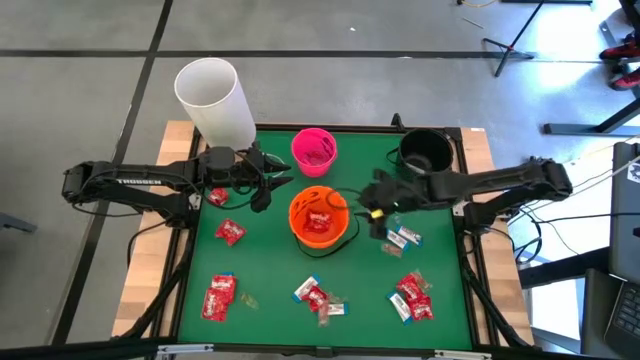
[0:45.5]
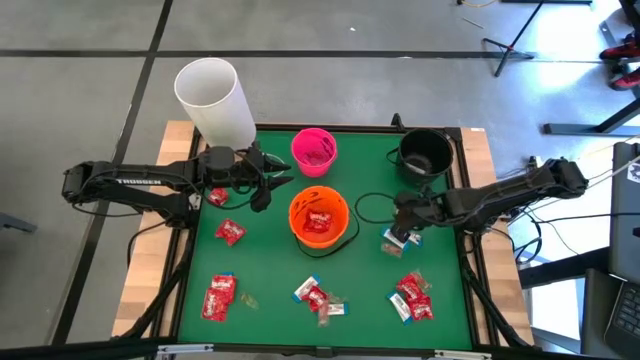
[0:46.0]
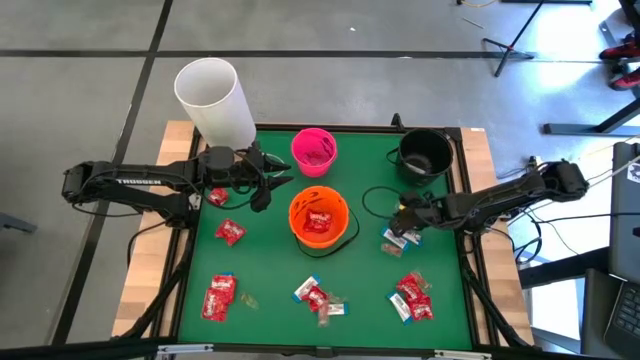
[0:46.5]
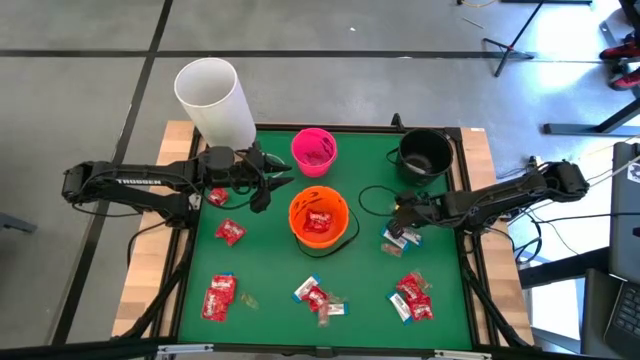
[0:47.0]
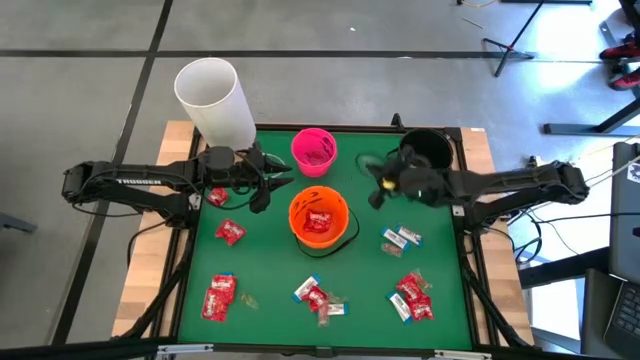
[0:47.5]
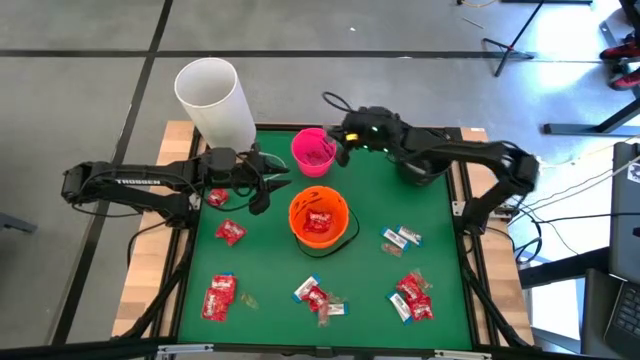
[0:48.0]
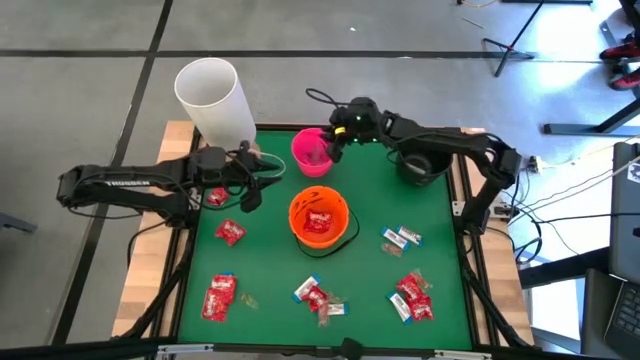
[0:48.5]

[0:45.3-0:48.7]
Task: Sort candy
Put the blue candy into the pink bucket

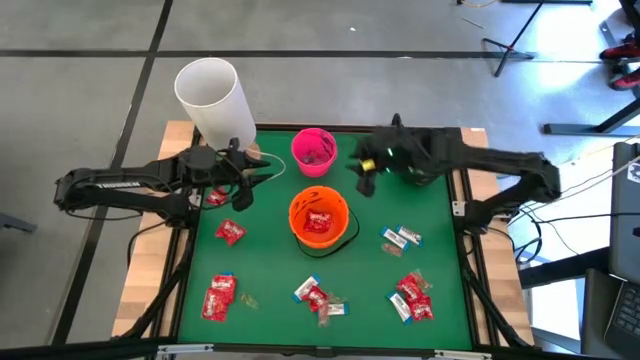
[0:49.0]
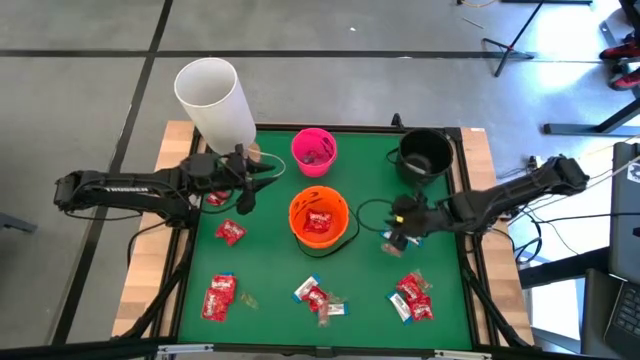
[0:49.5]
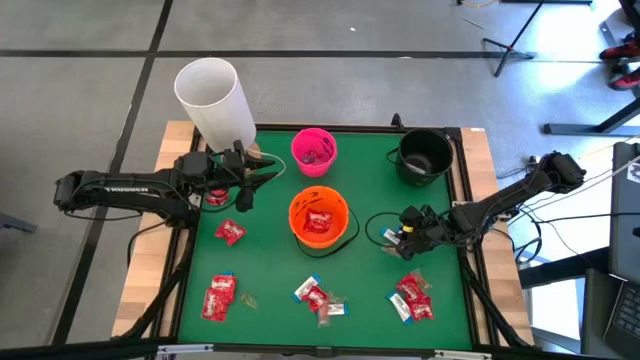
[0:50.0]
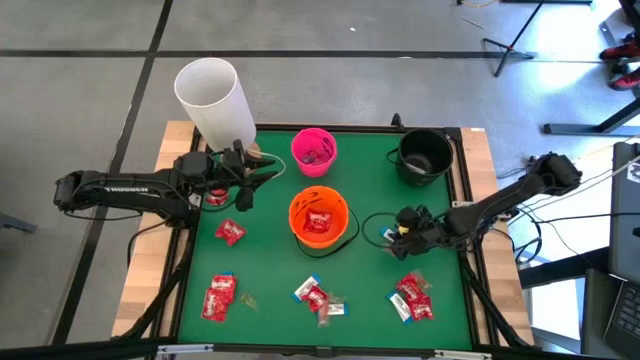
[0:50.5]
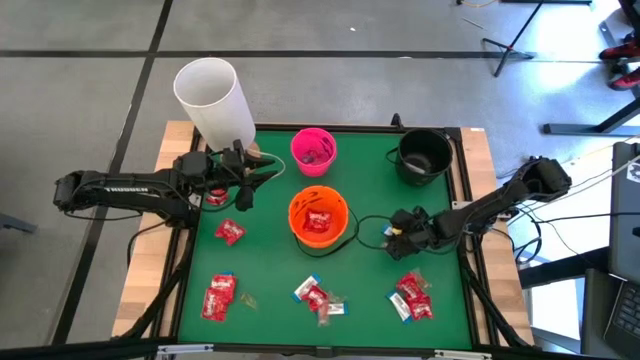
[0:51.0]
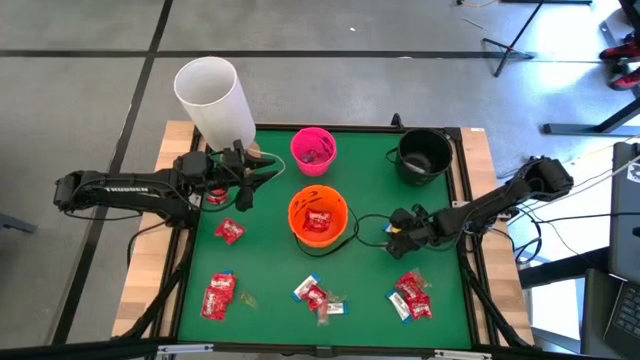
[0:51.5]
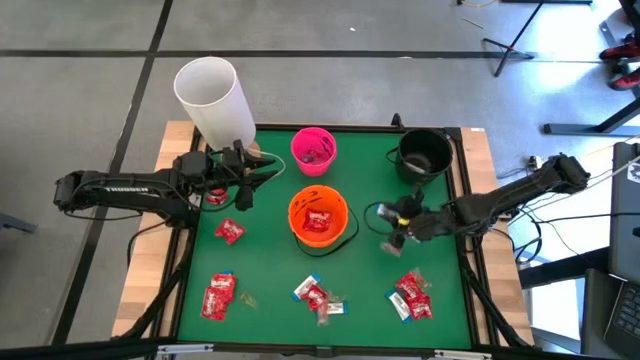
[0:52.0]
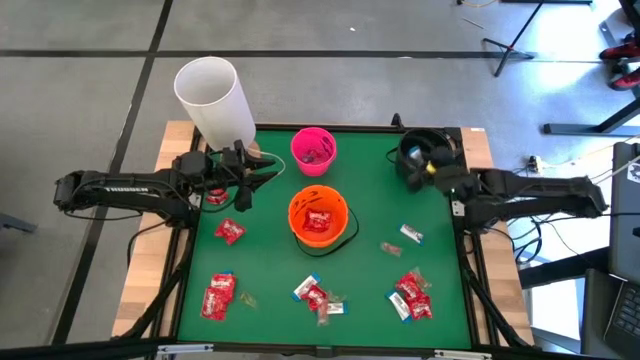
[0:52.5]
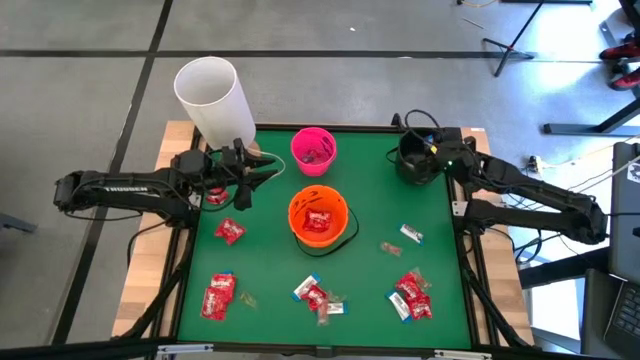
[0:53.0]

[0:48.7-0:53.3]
Put the white candy into the black bucket

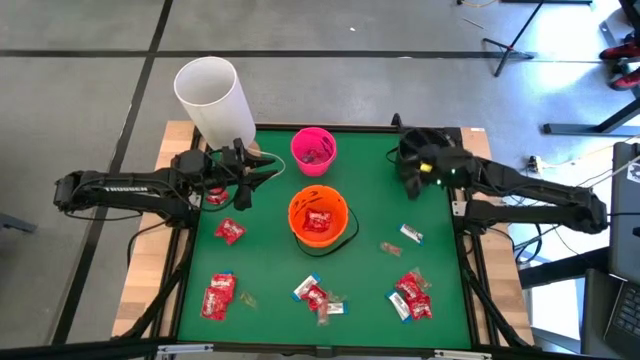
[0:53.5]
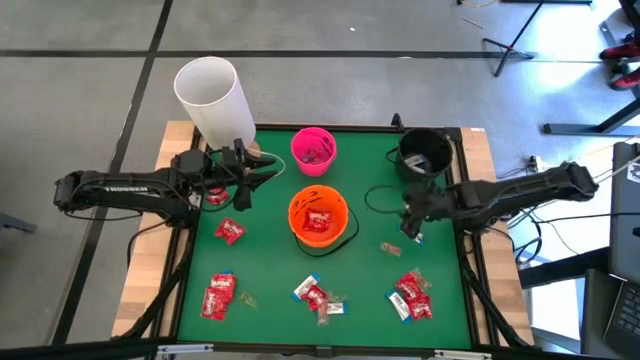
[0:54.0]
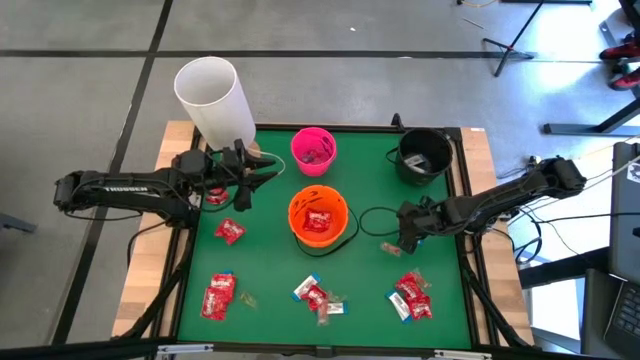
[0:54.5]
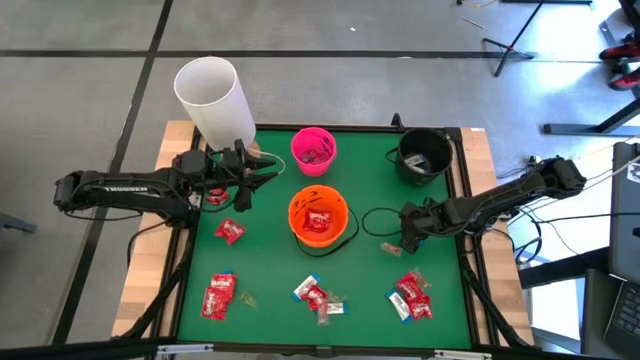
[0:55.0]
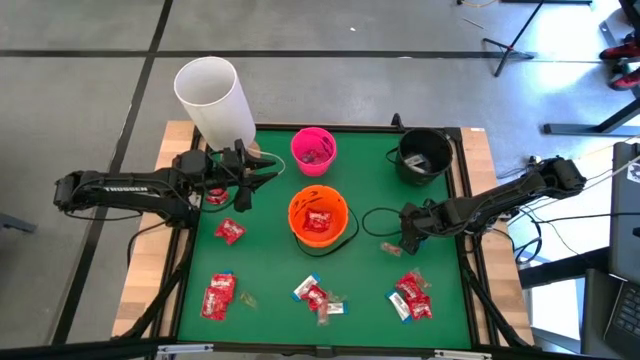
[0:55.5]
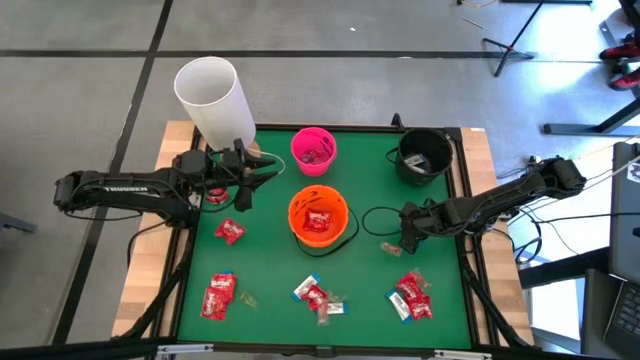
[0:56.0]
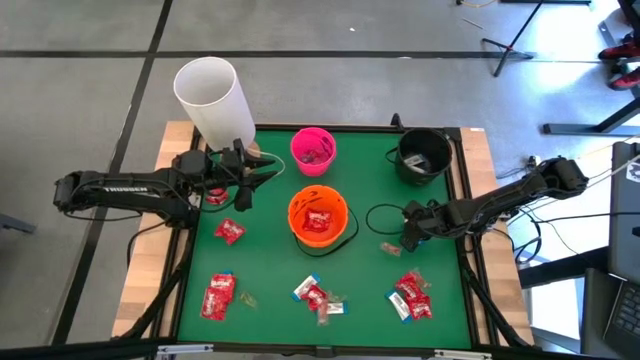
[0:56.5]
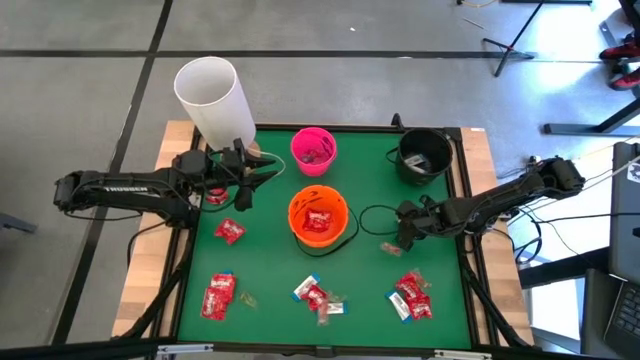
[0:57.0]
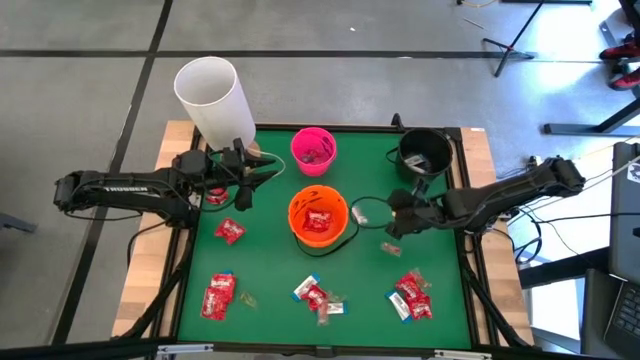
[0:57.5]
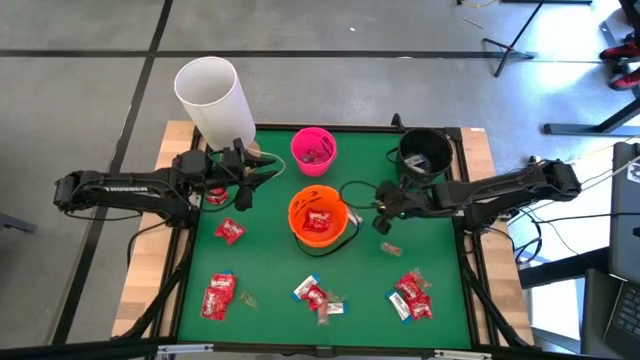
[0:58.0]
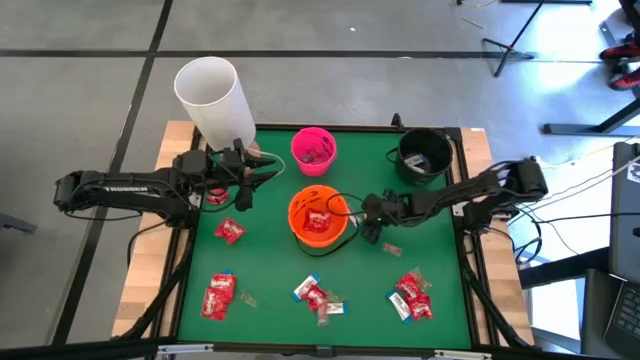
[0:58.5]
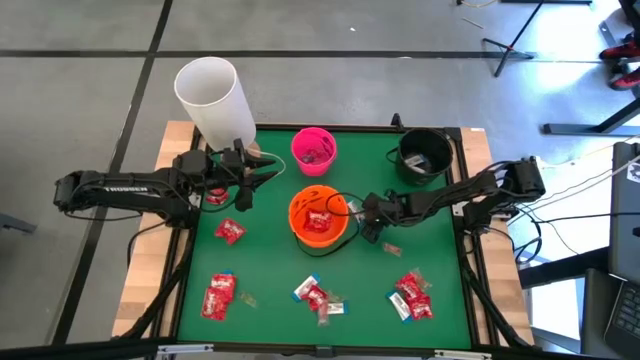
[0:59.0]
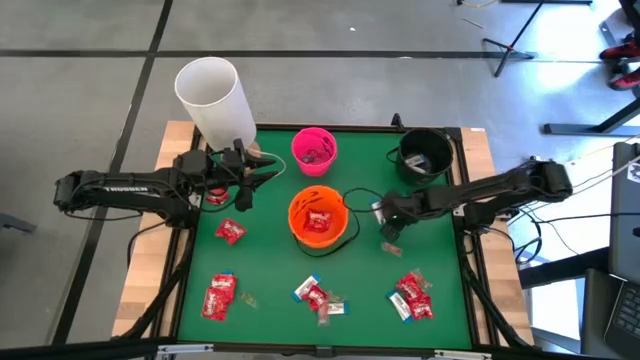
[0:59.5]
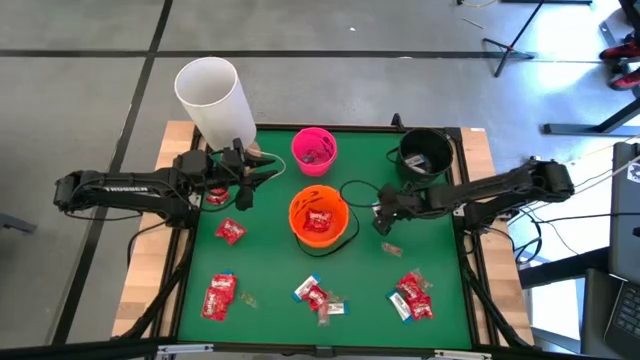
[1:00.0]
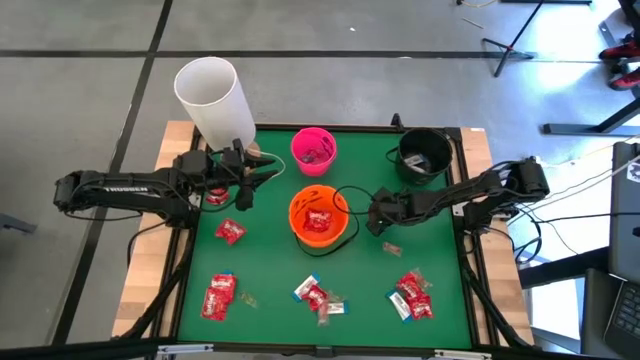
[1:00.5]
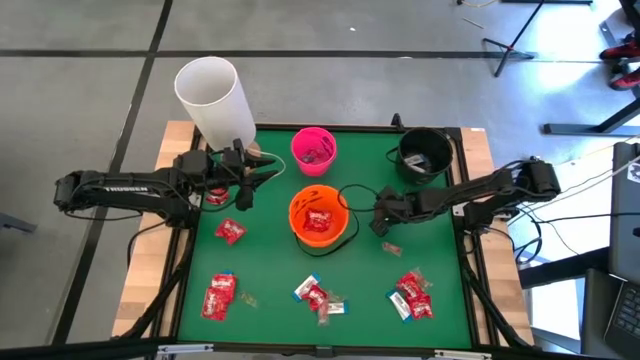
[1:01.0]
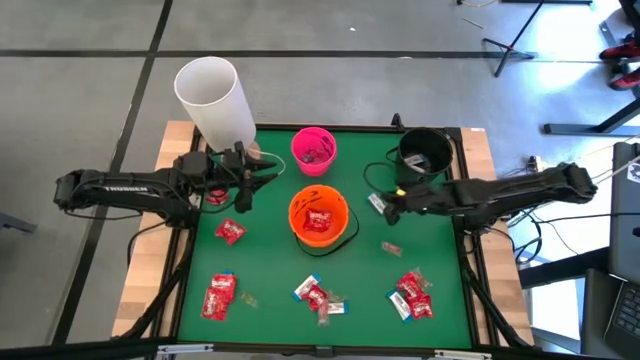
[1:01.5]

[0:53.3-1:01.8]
Put the white candy into the black bucket

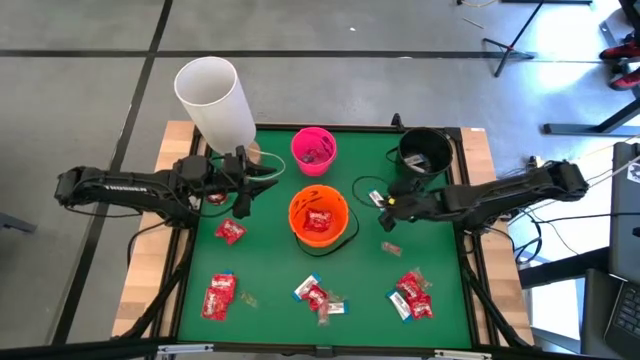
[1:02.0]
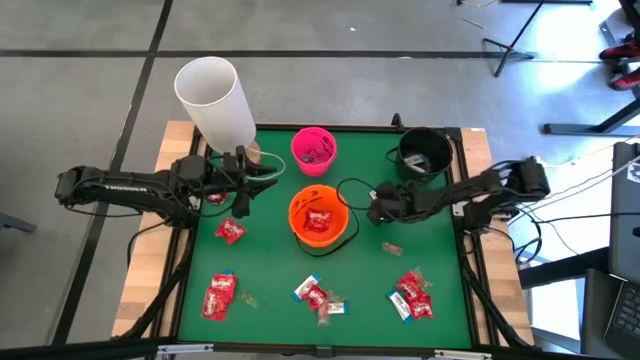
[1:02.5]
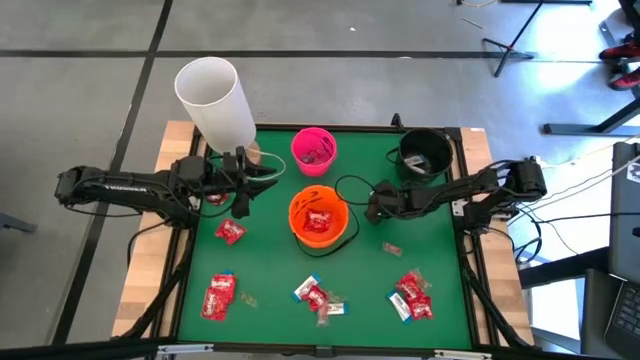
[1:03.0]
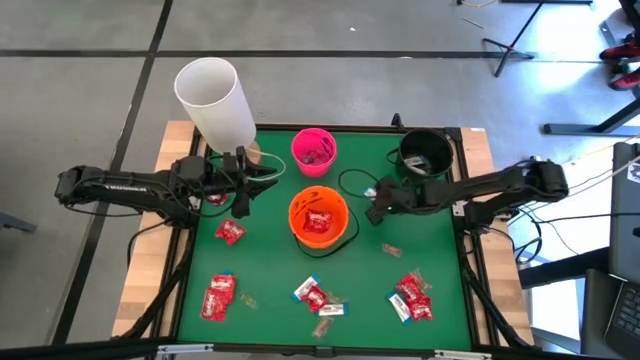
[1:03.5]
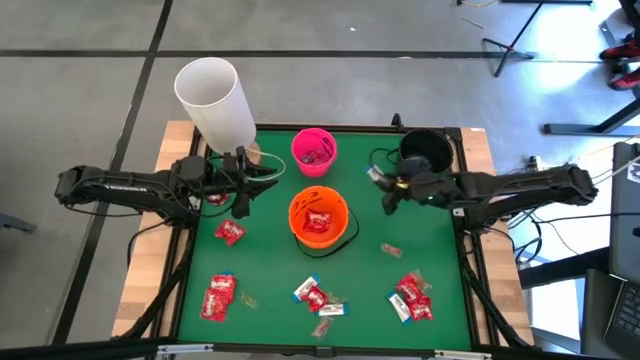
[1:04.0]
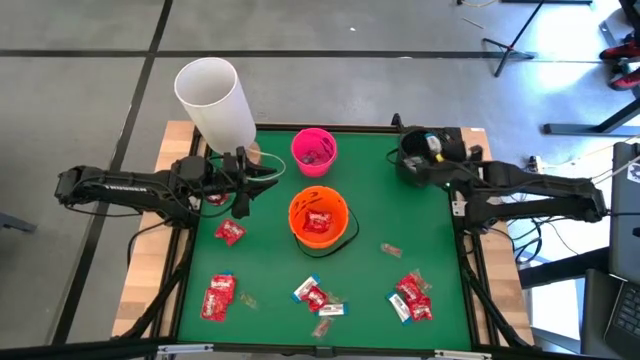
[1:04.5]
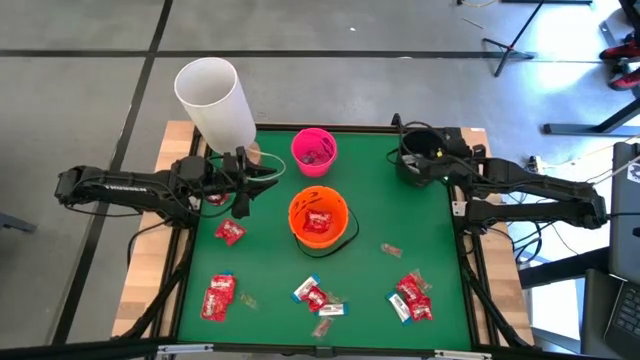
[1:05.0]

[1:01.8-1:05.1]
Put the white candy into the black bucket

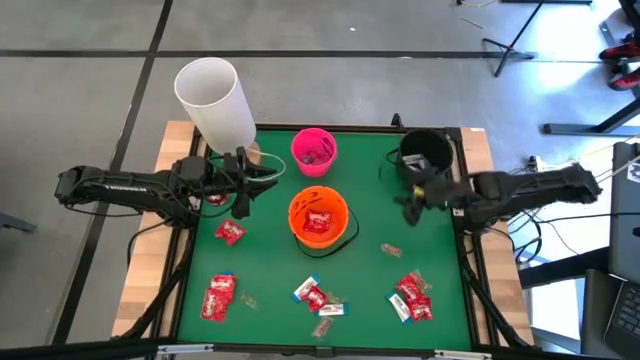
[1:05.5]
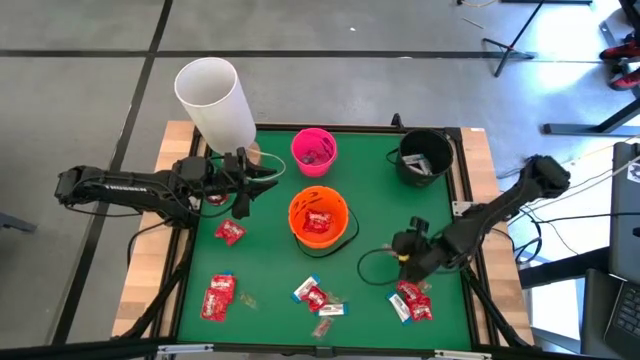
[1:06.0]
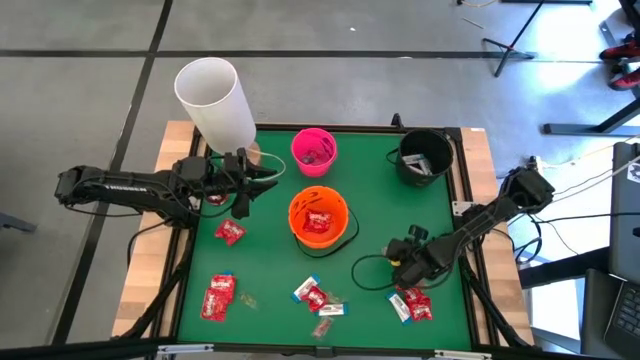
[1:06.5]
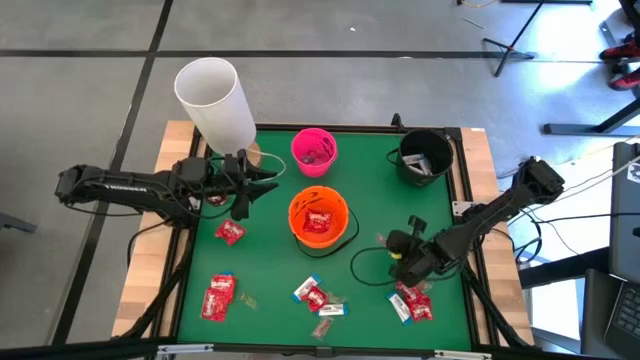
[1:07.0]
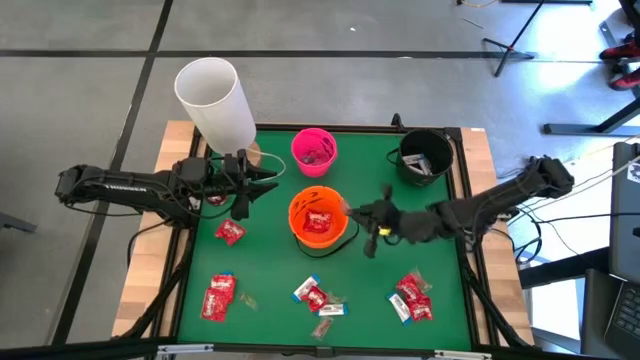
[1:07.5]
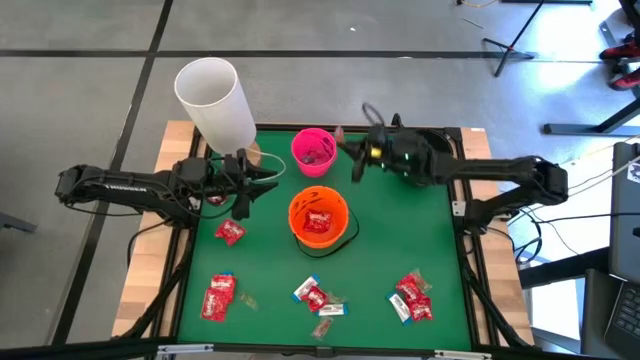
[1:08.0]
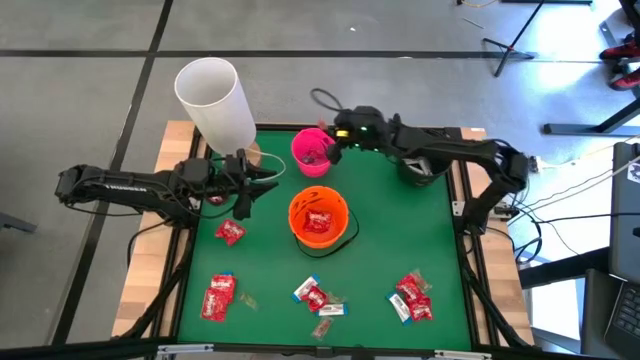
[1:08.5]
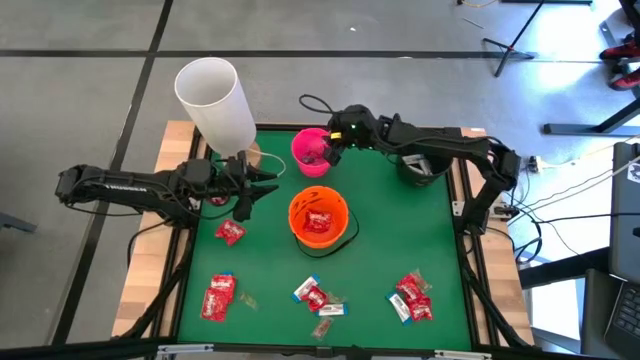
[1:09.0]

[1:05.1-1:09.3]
Put the red candy into the pink bucket
